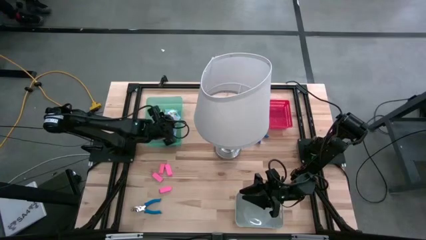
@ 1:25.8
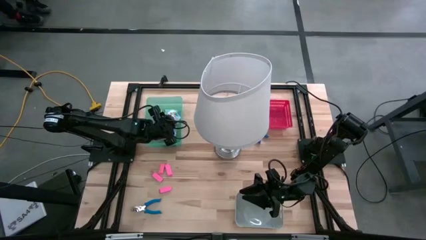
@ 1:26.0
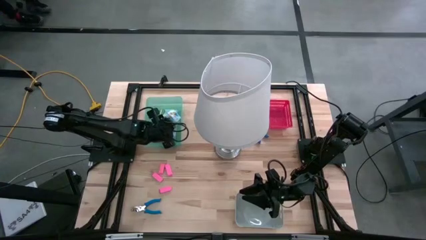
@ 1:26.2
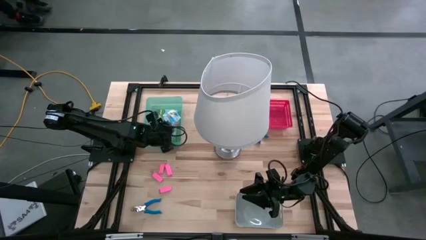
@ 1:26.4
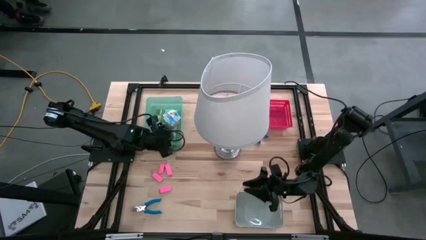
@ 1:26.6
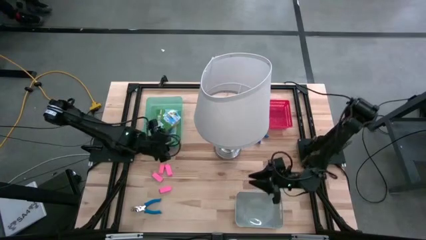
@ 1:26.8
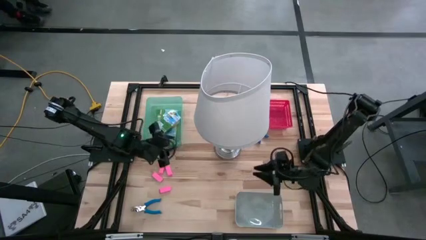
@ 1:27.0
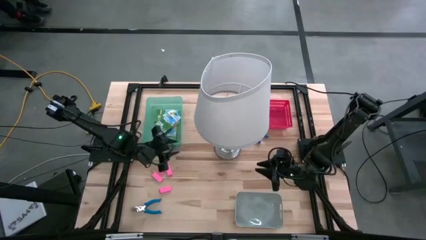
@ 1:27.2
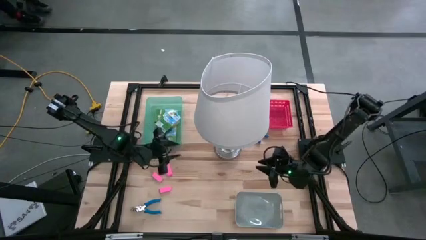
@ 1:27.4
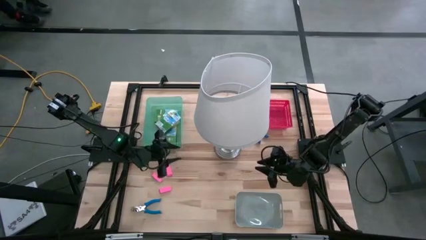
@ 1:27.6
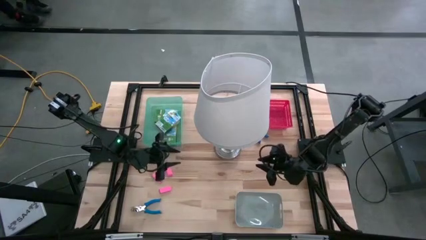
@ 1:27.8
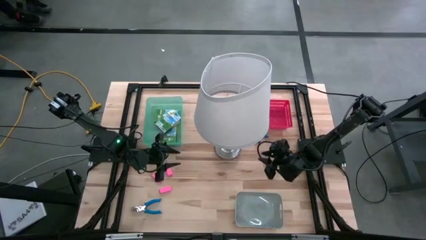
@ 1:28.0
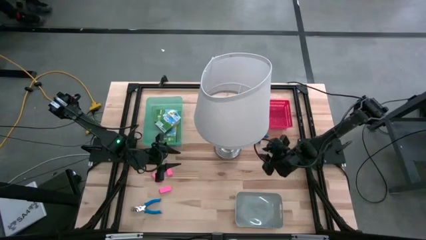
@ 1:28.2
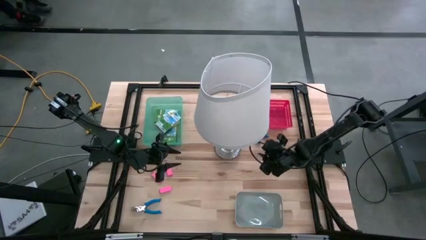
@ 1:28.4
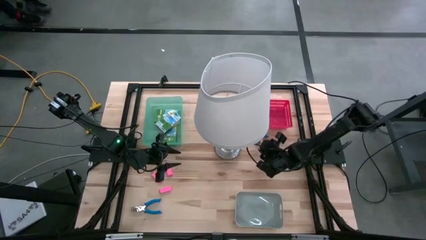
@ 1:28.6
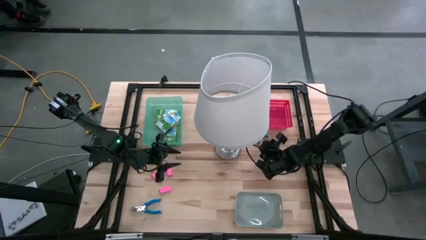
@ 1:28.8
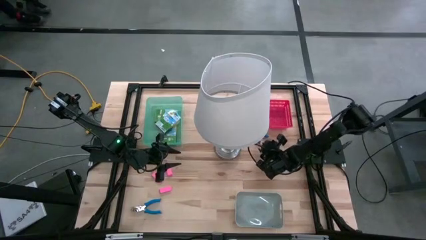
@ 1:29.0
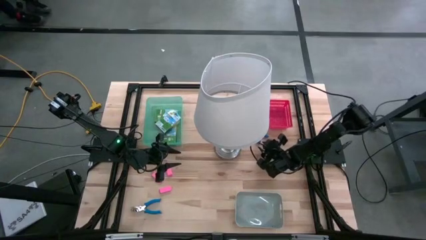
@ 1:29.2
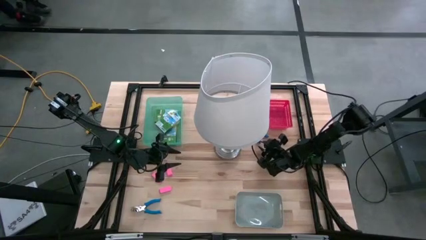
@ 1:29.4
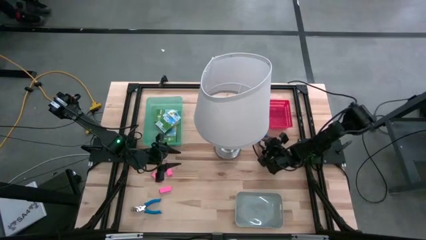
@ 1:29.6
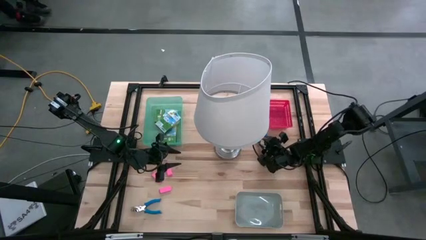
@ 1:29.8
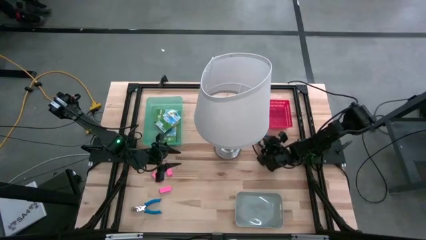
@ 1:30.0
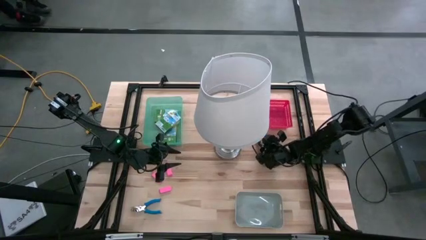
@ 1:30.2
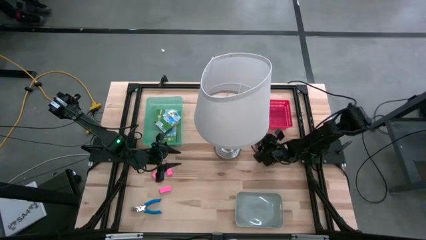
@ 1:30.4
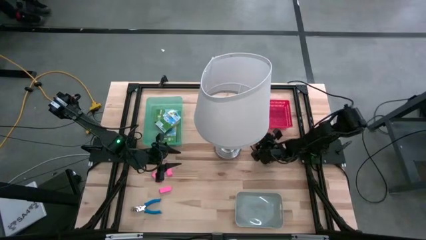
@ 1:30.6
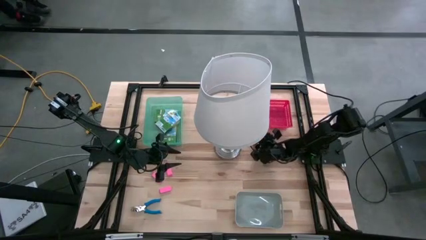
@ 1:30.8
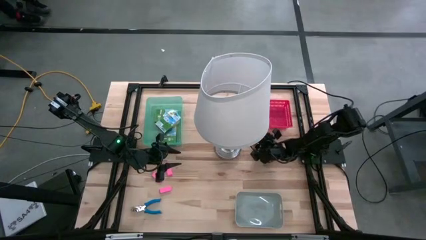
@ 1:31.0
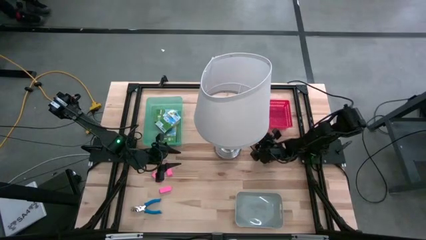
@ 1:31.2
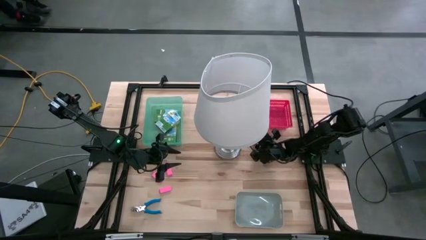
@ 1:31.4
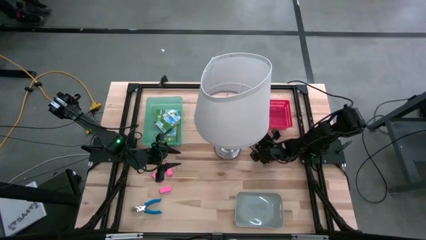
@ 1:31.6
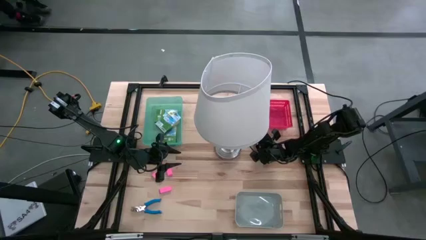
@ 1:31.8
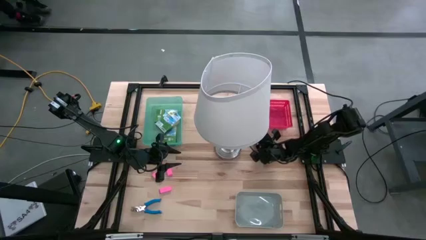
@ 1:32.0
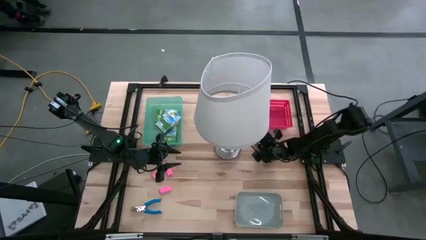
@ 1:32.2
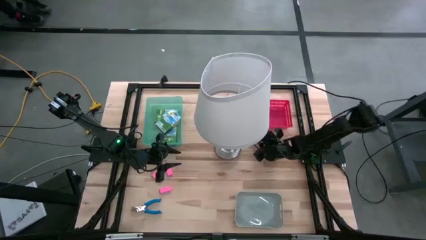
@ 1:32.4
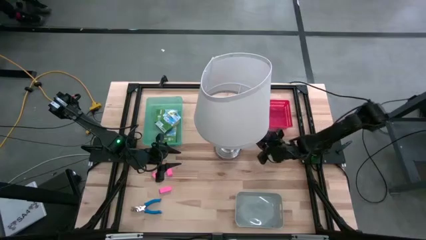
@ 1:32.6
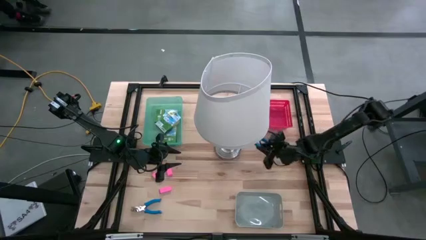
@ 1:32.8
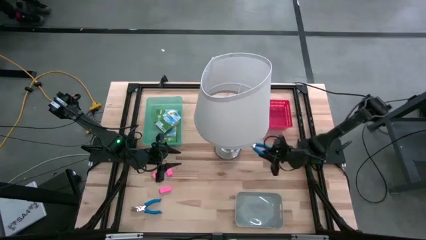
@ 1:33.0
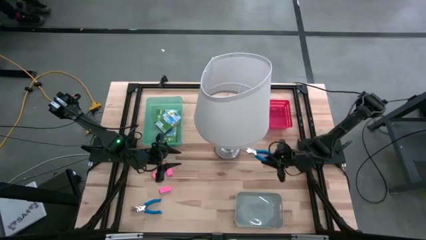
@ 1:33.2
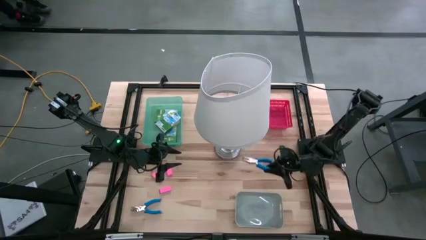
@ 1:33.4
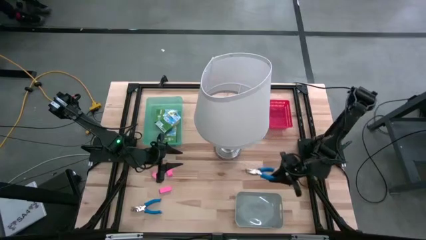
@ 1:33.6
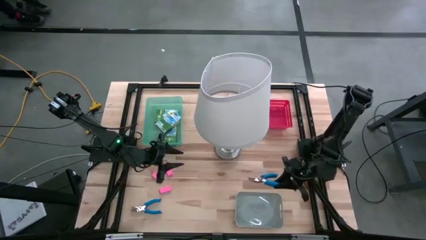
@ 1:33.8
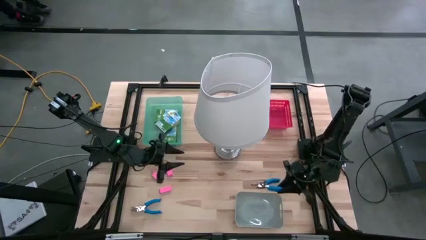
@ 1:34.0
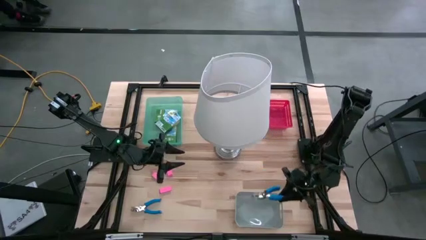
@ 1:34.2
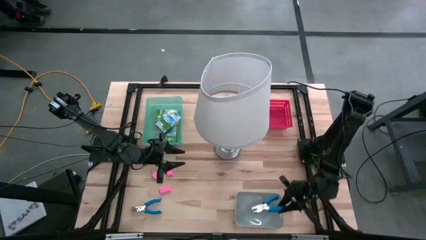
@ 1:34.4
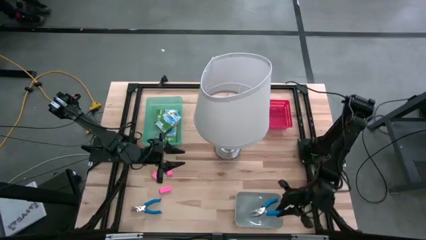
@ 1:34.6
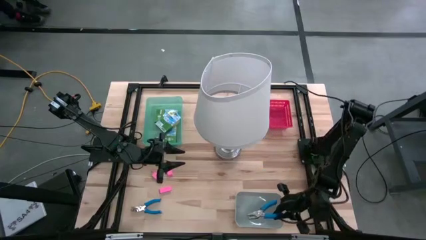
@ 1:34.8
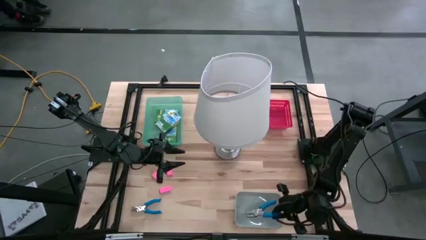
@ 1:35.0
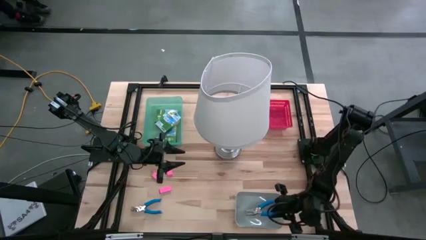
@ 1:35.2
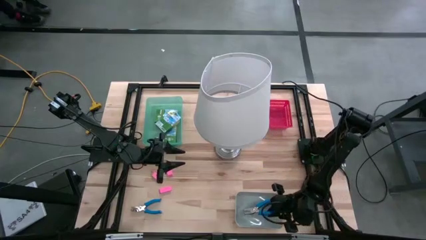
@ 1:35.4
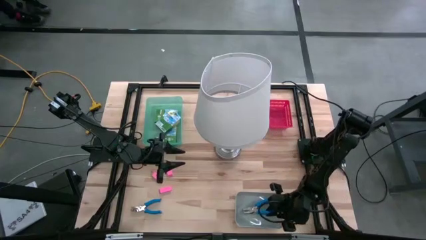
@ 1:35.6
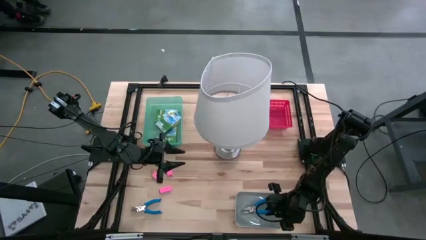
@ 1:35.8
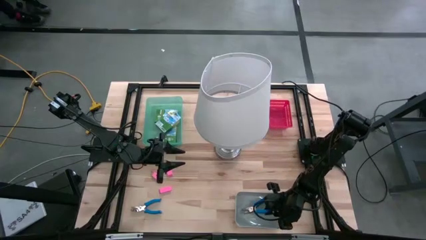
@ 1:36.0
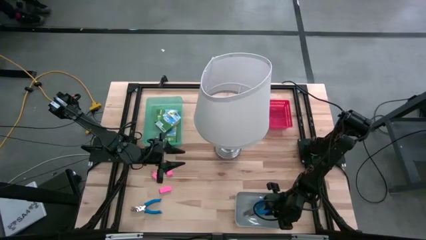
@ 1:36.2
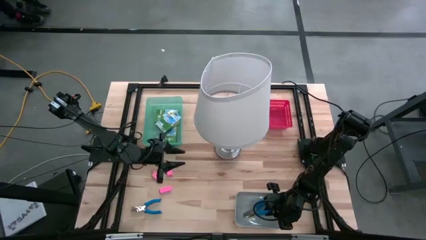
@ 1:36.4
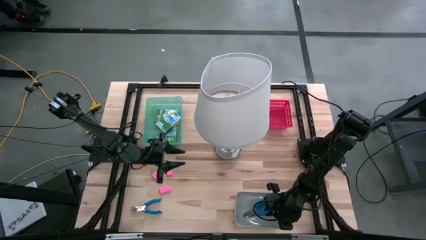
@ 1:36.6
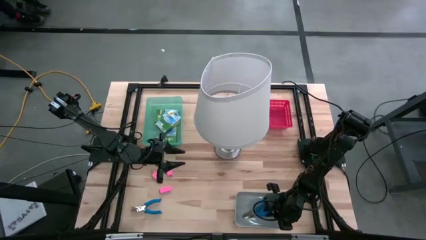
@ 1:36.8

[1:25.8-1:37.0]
Task: Pick & Place School Supplies
Put the blue hole puncher into the gray bin

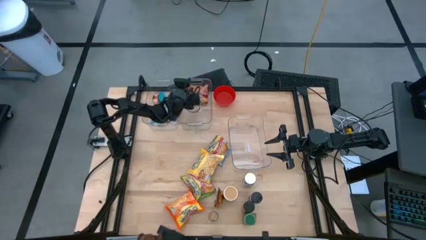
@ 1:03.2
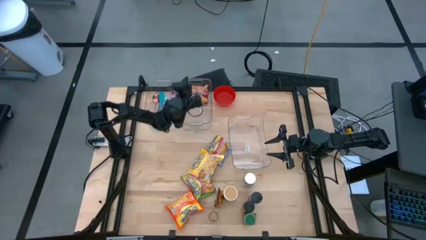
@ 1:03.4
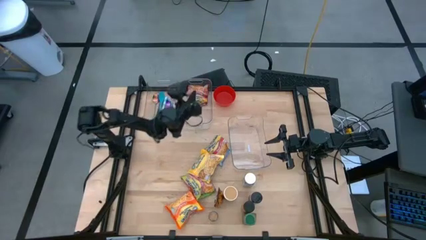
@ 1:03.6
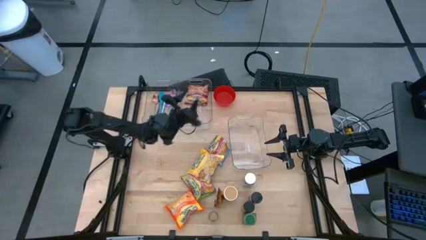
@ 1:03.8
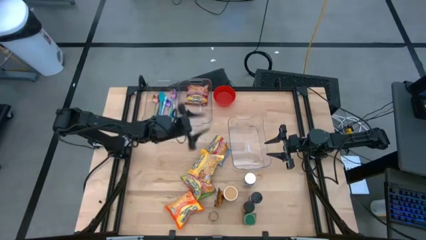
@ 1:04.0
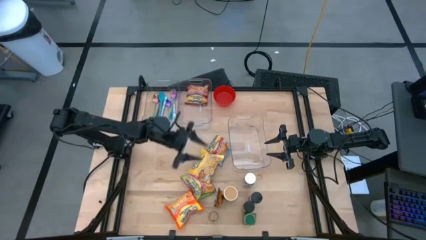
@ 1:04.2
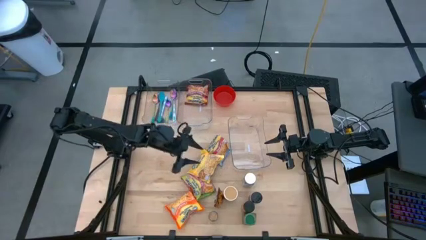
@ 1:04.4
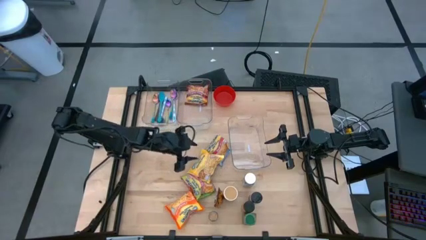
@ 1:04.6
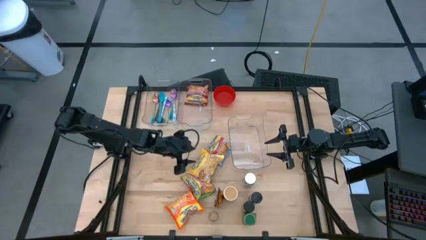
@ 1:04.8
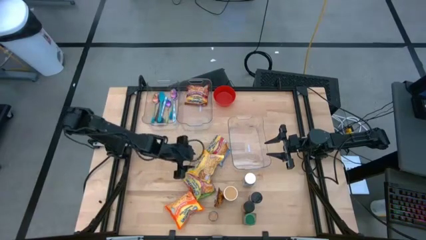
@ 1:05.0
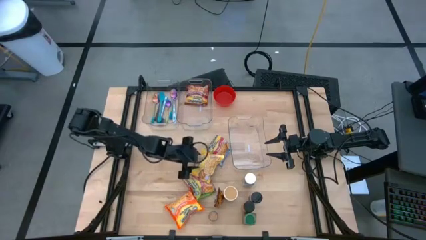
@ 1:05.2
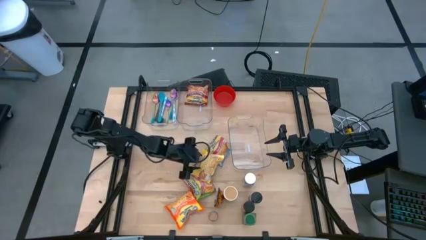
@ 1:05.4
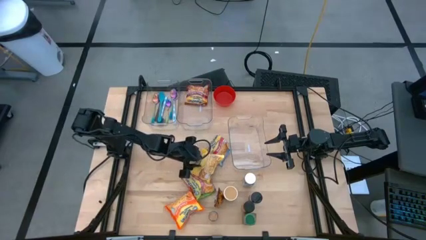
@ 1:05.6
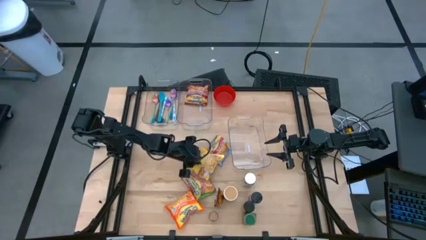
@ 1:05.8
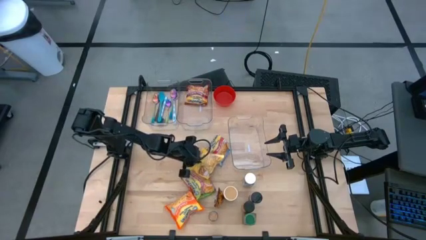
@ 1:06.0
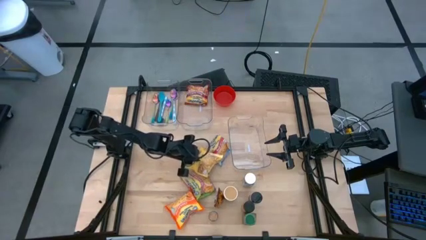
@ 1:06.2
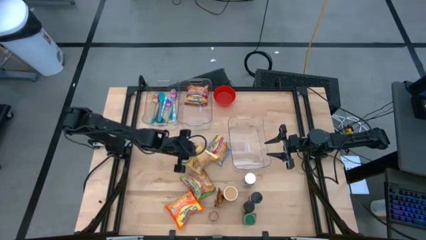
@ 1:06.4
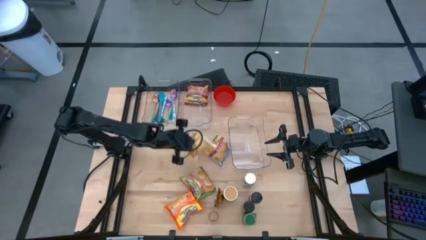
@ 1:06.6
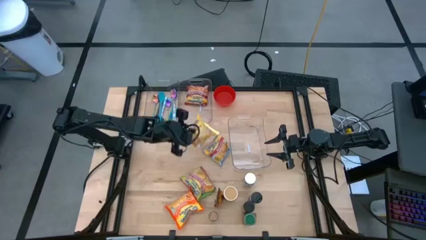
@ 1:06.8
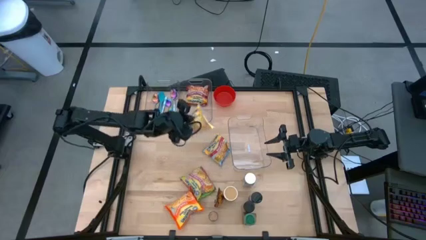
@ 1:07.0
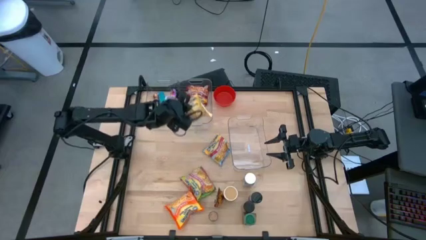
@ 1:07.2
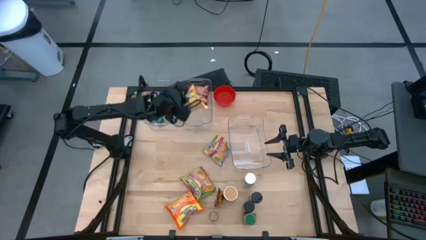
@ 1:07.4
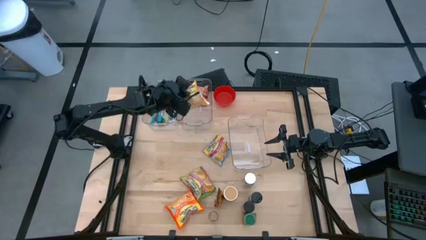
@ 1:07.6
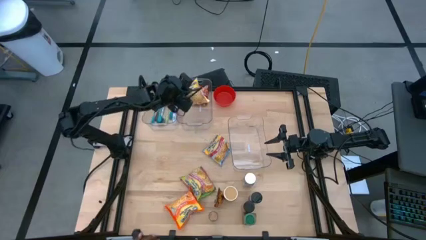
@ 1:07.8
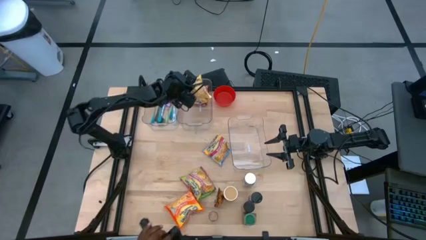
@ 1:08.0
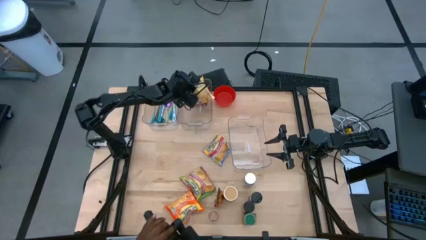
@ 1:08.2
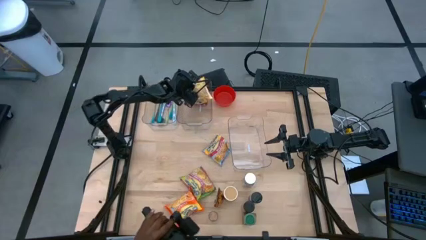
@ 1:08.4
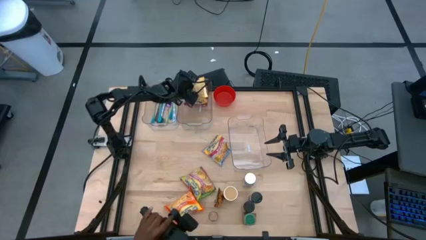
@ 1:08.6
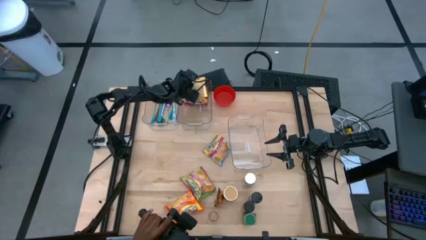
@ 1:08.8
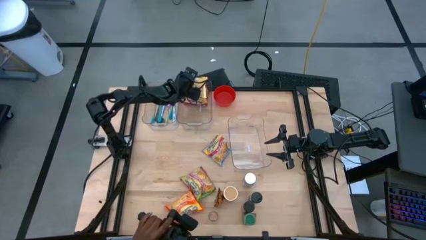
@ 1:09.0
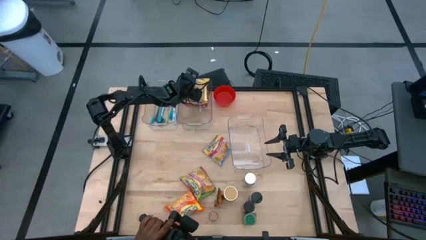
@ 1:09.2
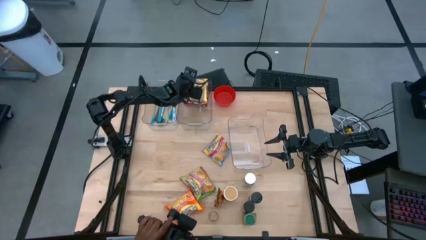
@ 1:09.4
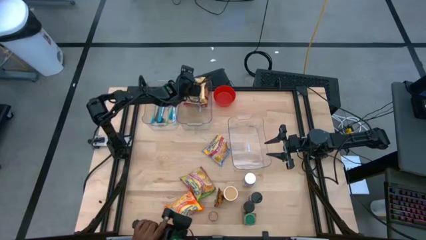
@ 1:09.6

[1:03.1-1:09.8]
Task: Pick & Place Food Item
Put the yellow noodle pack into the top right transparent bin
